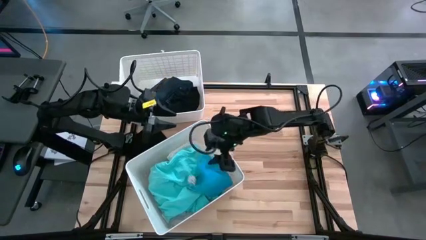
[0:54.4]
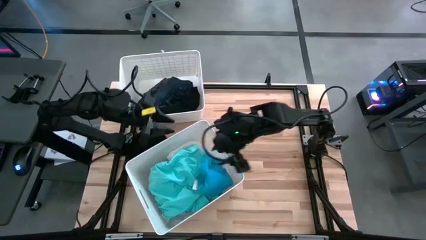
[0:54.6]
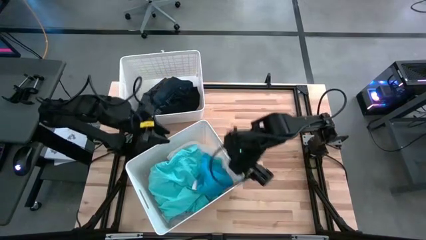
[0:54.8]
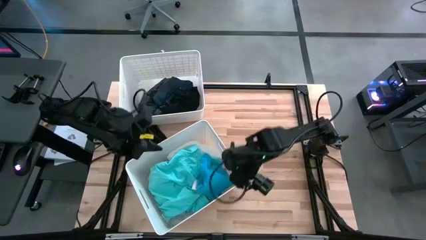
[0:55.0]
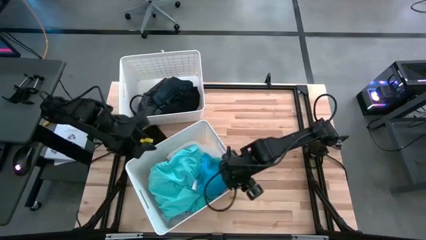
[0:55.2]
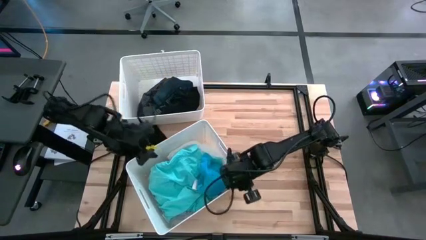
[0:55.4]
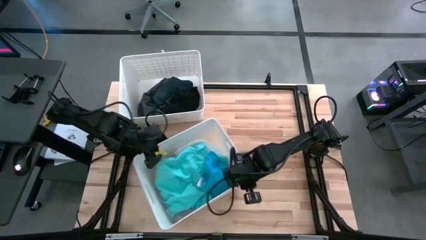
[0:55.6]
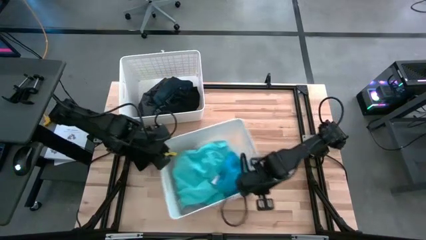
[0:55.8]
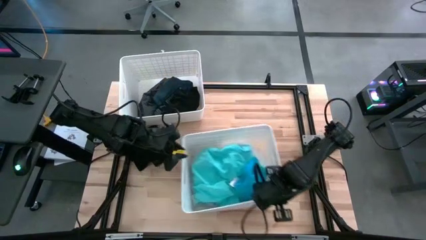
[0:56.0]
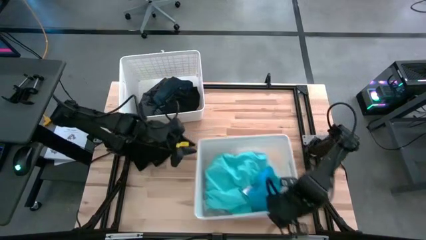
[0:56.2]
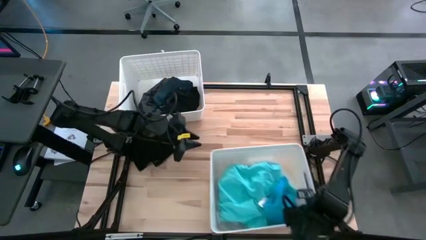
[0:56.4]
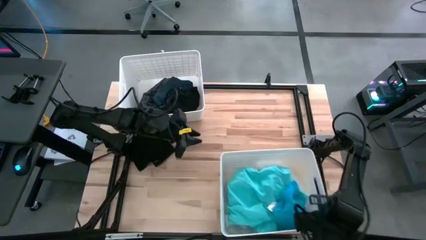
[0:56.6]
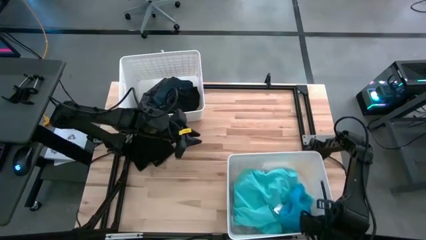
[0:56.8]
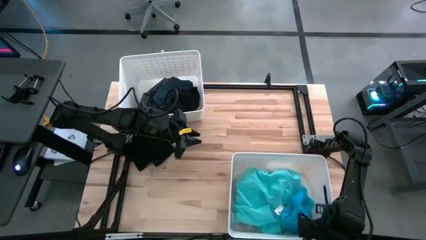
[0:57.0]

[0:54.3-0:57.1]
Task: Sort clothes
Move the bottom white bin

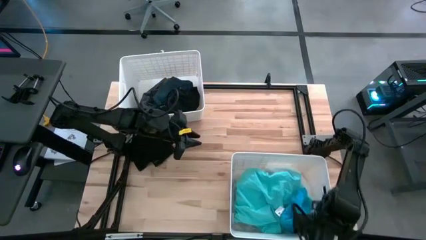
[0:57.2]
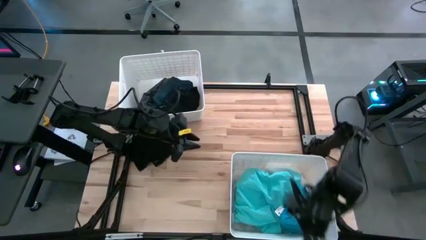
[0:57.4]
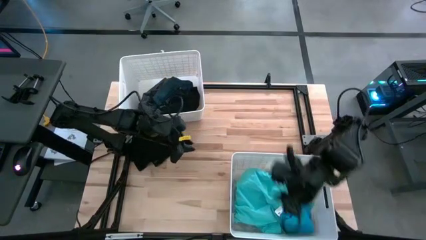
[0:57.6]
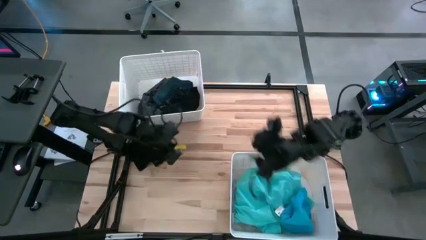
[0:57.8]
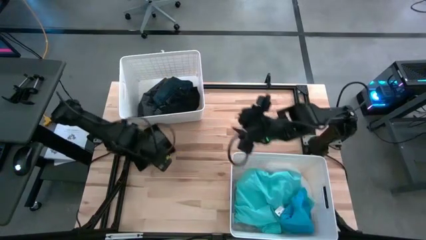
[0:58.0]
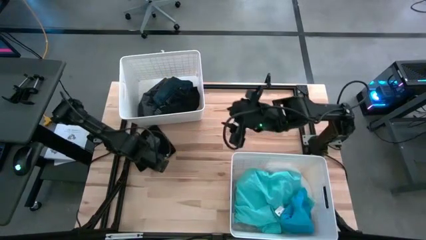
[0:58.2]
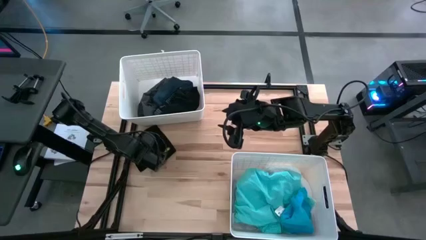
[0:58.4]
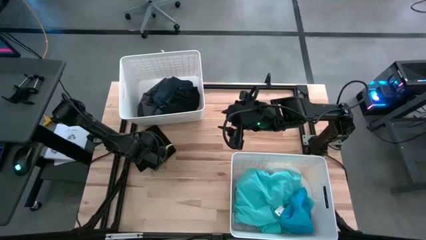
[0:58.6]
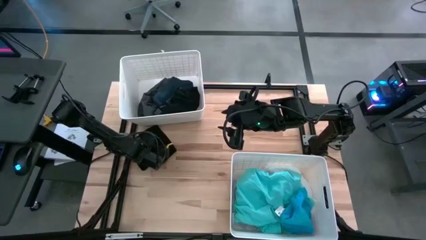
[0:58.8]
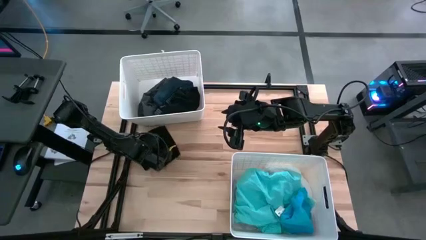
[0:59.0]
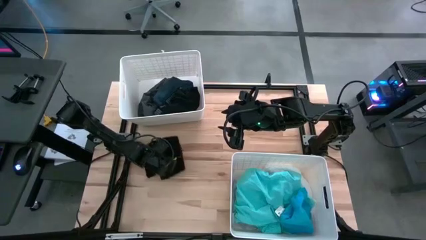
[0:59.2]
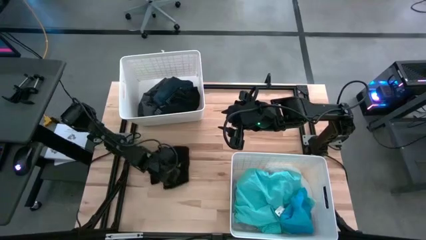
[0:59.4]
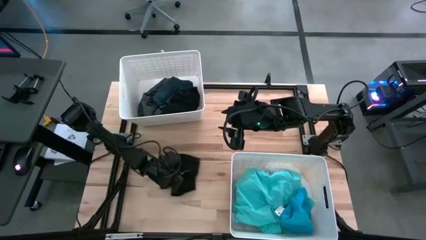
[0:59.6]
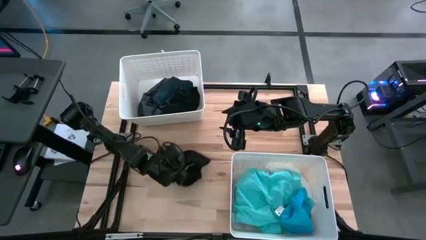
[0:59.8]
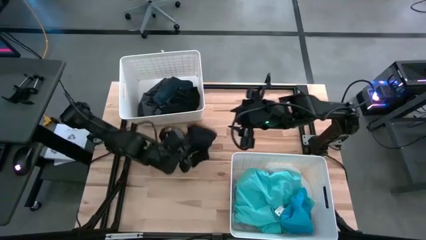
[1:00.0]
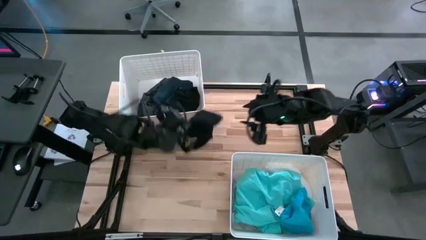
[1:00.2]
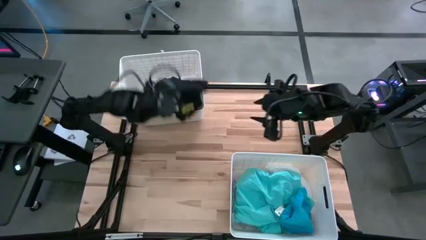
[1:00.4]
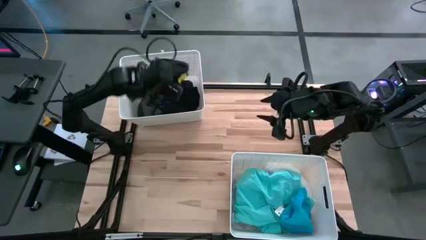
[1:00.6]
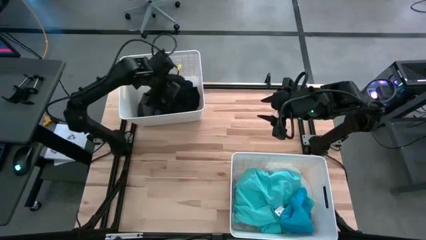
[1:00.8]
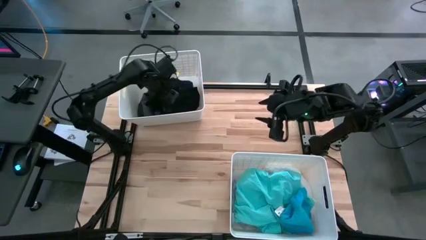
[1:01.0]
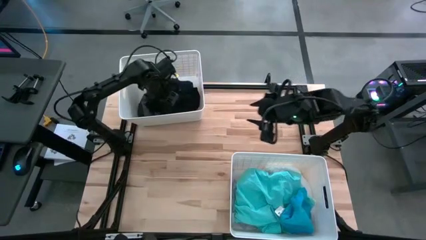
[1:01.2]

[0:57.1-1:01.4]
Put the black short into the top white bin

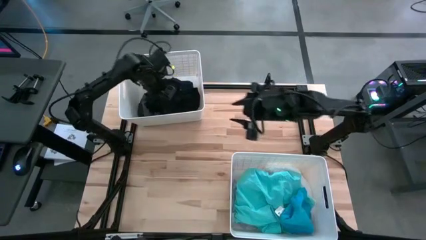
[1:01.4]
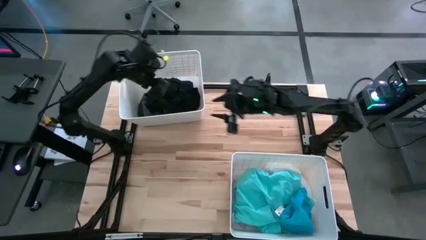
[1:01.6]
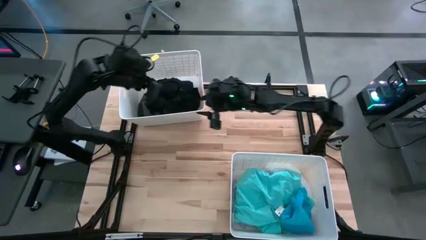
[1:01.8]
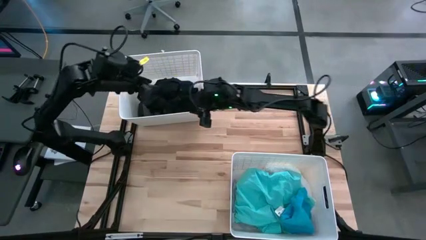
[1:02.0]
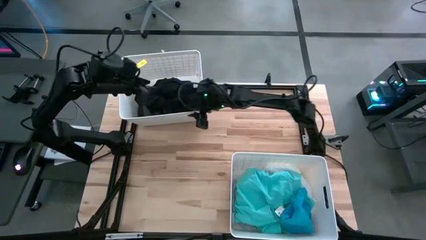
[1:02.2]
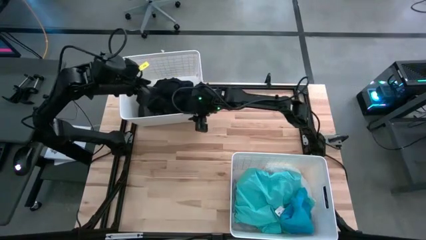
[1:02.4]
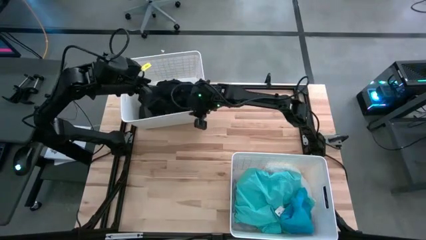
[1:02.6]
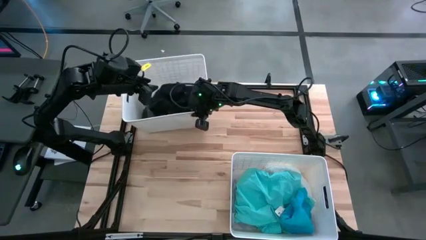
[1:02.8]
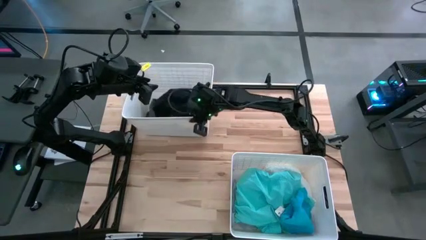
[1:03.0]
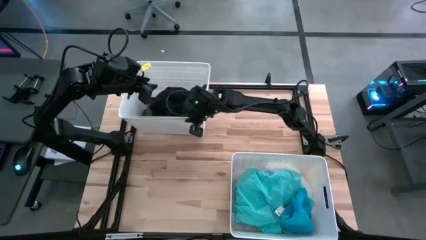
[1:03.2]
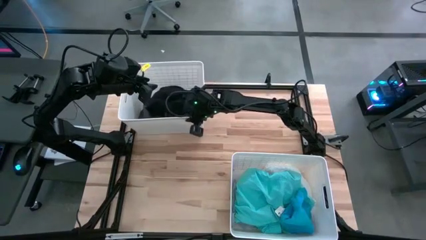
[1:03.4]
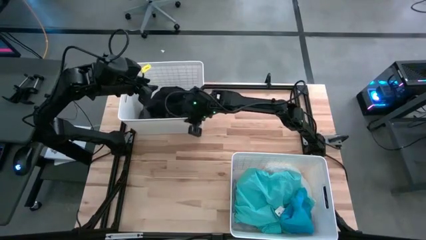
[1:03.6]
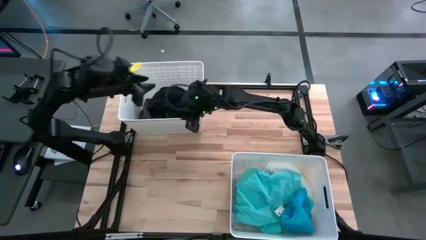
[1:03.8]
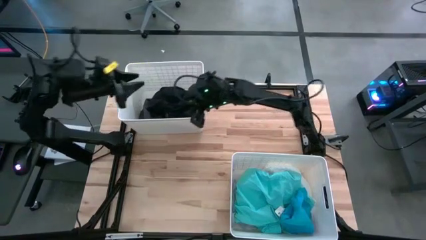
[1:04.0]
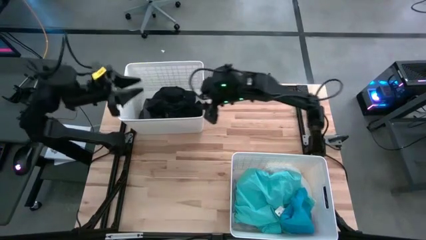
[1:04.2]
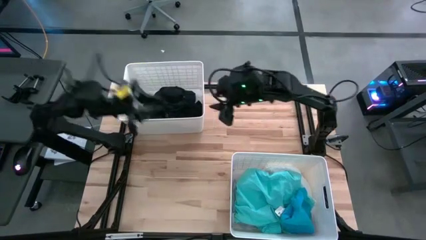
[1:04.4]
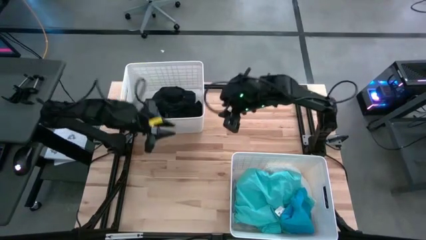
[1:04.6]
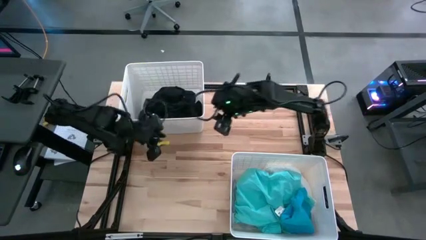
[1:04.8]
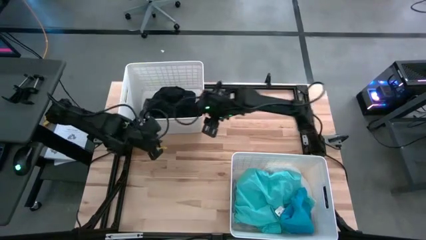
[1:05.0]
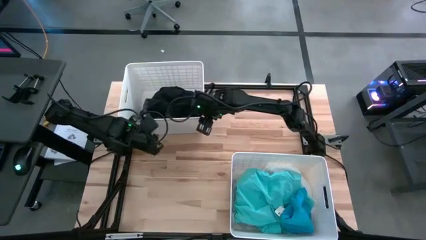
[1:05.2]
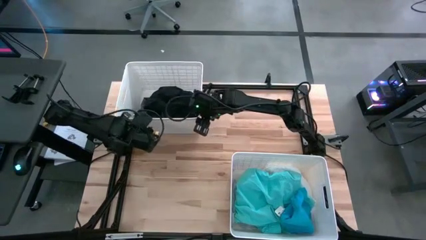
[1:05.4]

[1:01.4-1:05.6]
Adjust the top white bin

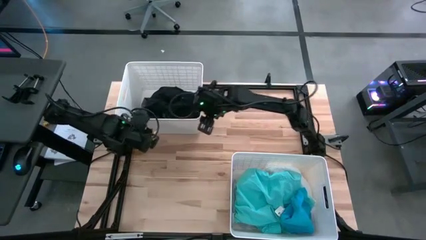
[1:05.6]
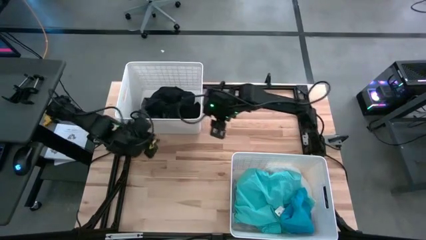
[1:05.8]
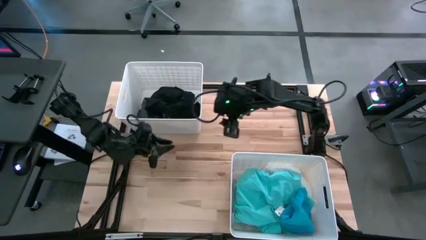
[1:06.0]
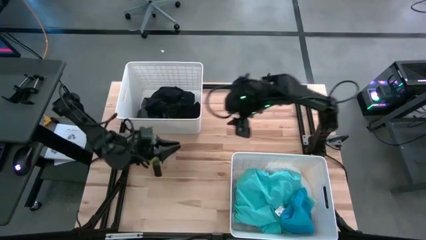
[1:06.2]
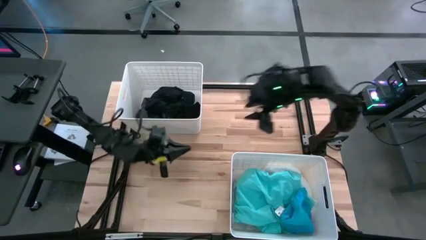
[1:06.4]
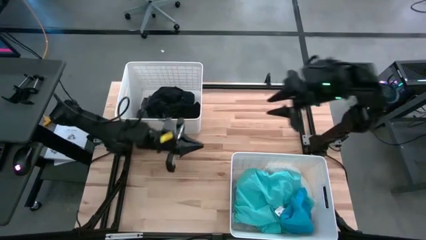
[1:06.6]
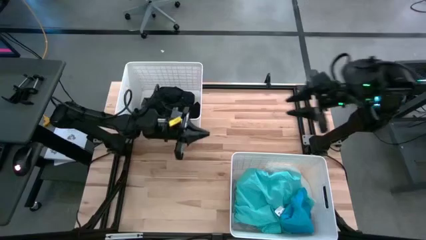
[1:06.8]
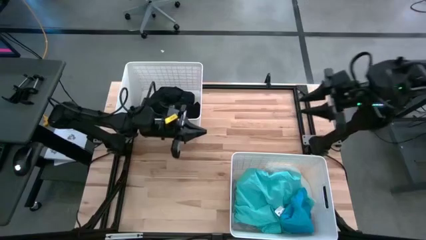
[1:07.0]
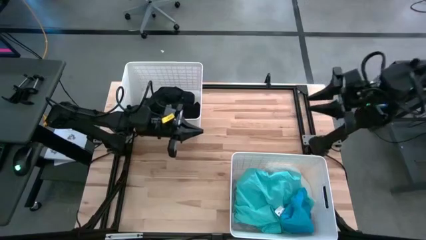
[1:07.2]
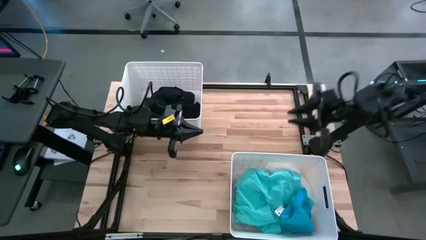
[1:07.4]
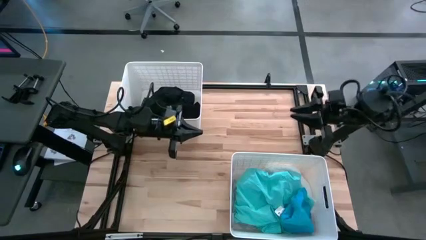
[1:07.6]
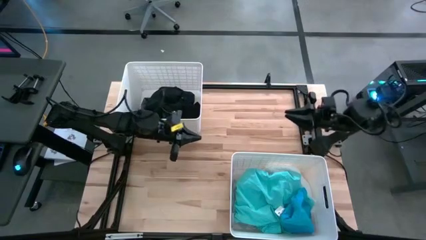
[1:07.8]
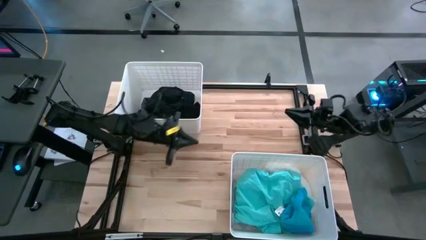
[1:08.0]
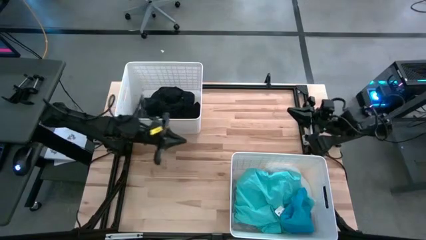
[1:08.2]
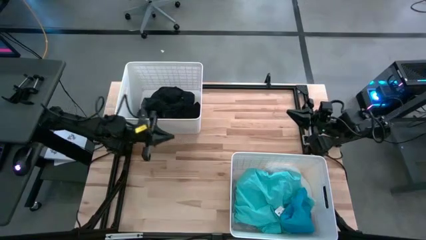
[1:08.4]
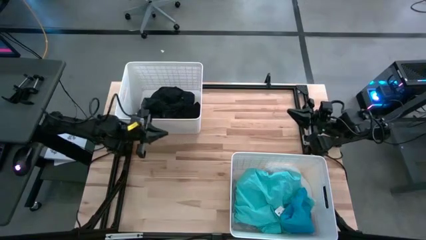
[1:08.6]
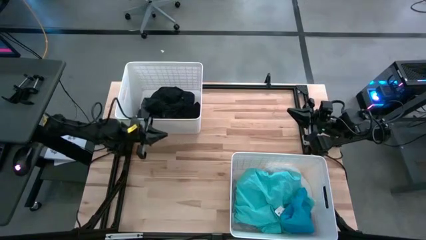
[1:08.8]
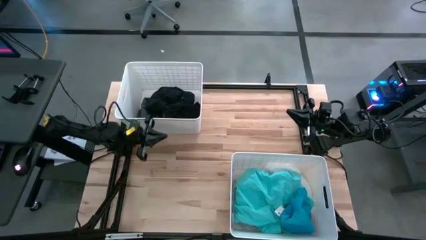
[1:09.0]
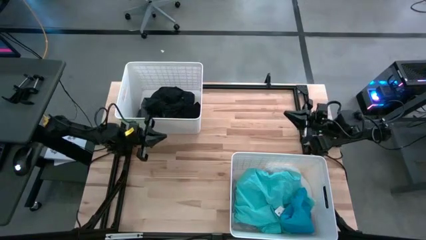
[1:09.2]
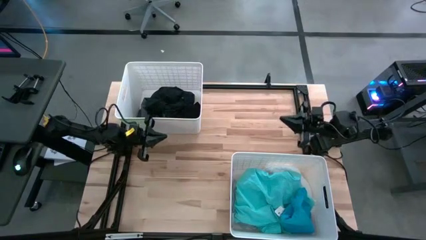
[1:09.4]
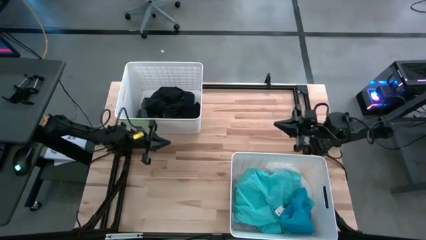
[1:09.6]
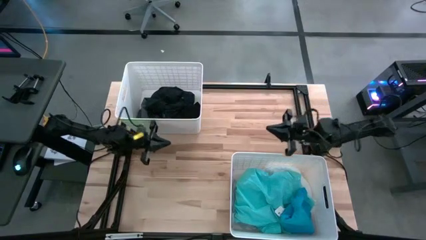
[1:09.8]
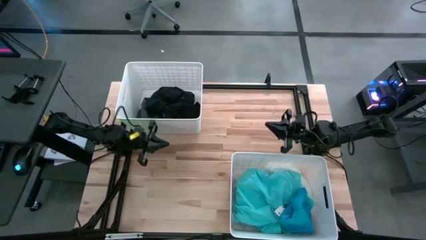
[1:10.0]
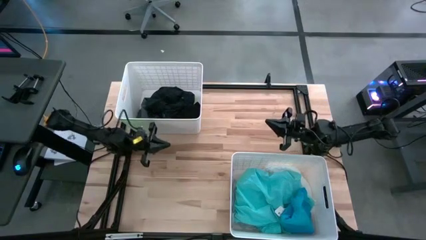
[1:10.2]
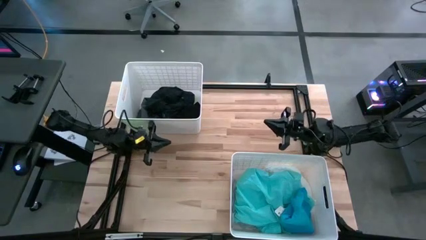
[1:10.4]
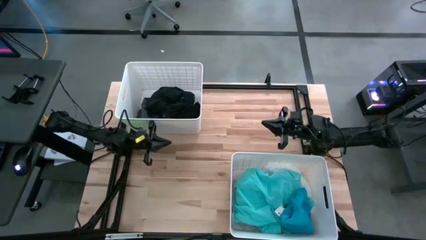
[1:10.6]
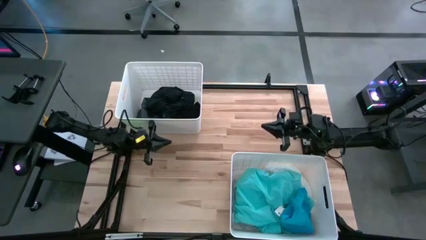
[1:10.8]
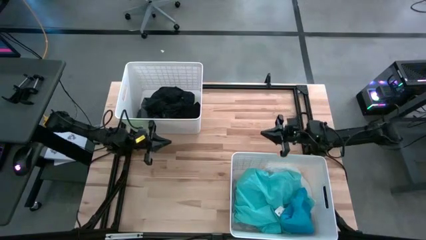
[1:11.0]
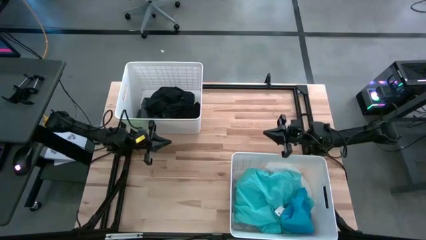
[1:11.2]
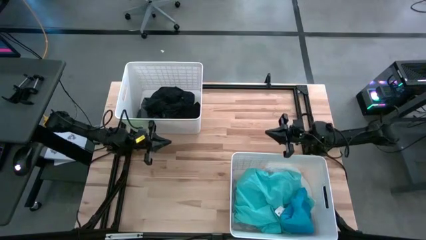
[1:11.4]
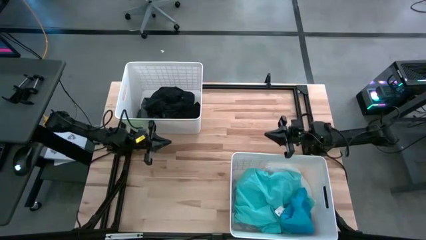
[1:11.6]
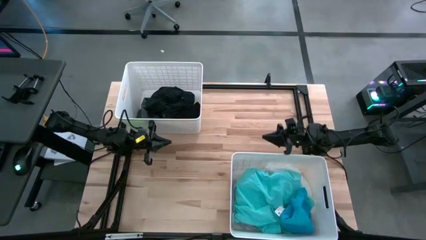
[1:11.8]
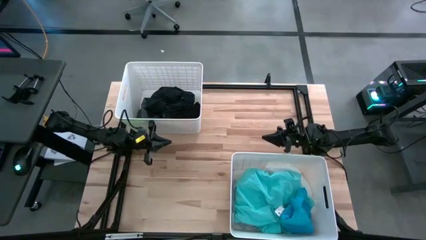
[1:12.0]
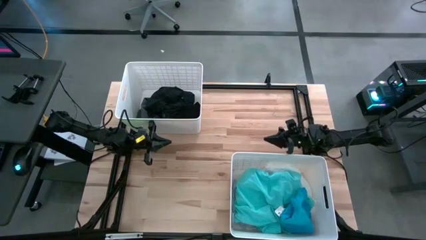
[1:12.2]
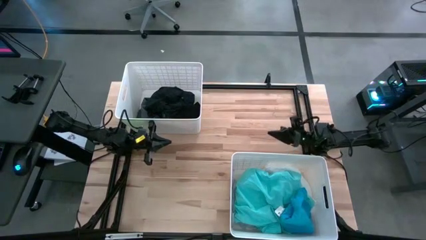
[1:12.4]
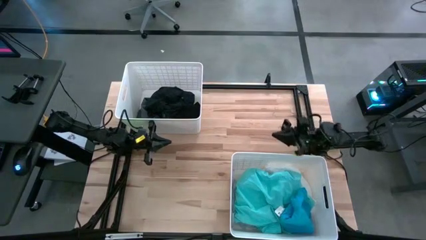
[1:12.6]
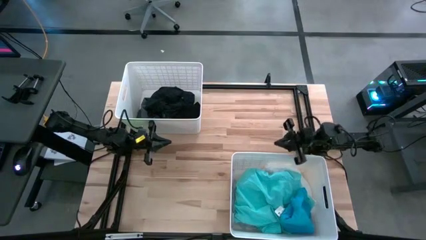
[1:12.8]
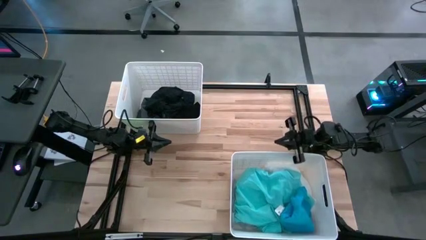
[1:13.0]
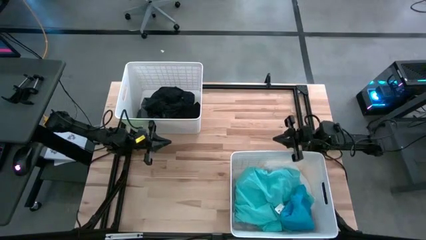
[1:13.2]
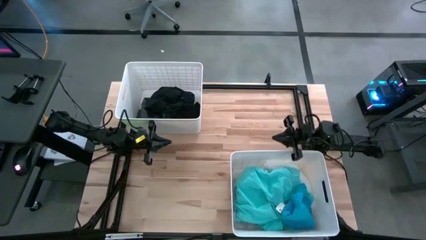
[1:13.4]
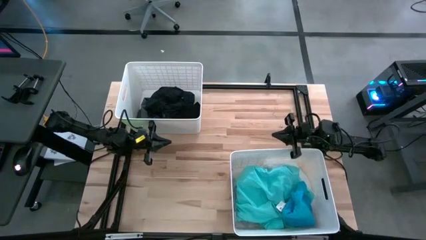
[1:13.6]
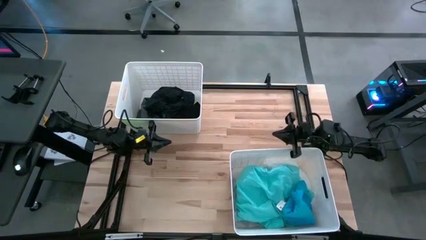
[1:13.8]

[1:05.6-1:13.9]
Return to Home Position
